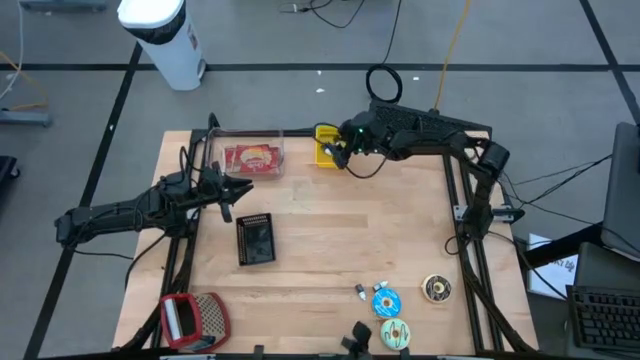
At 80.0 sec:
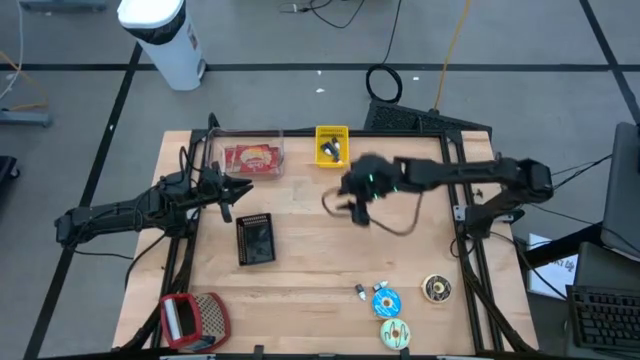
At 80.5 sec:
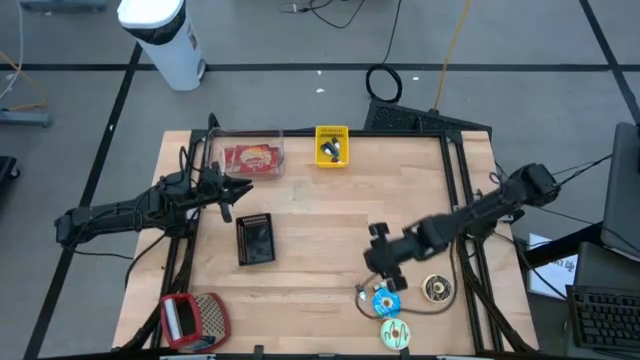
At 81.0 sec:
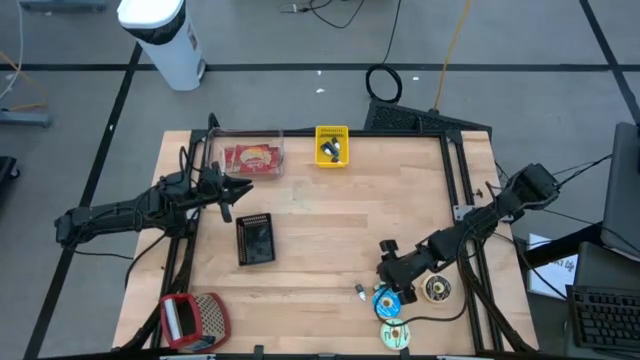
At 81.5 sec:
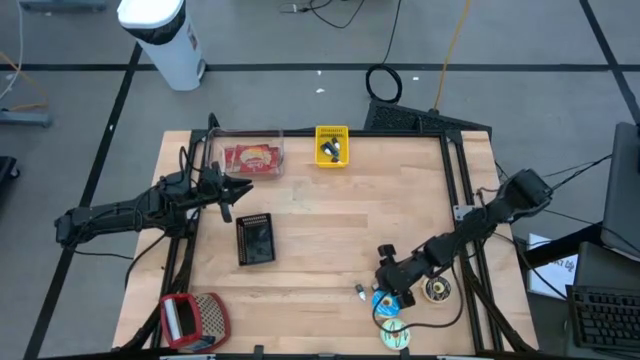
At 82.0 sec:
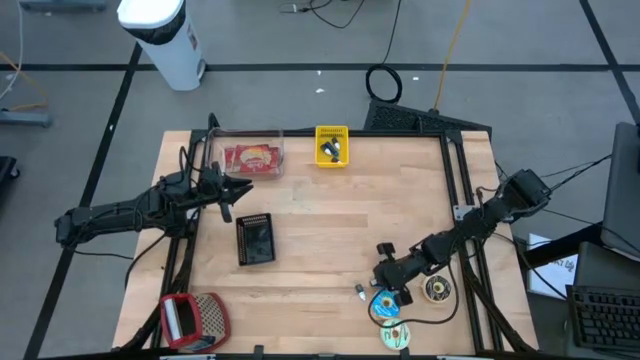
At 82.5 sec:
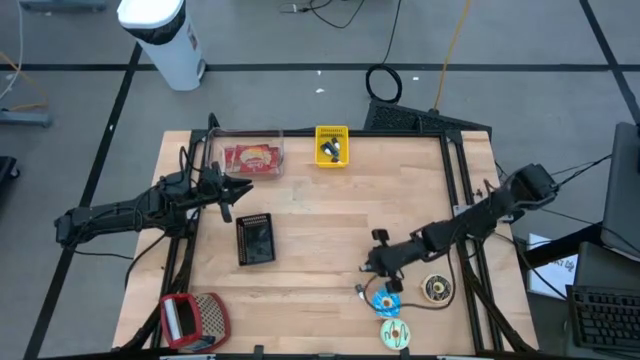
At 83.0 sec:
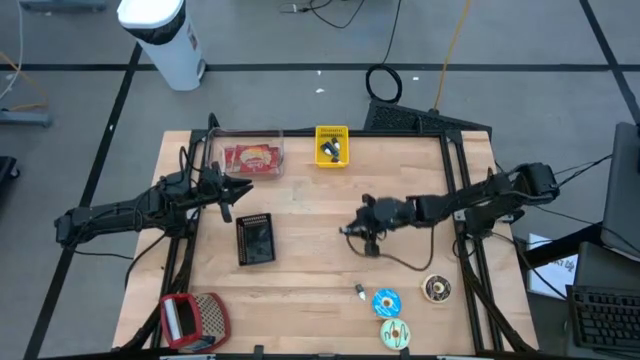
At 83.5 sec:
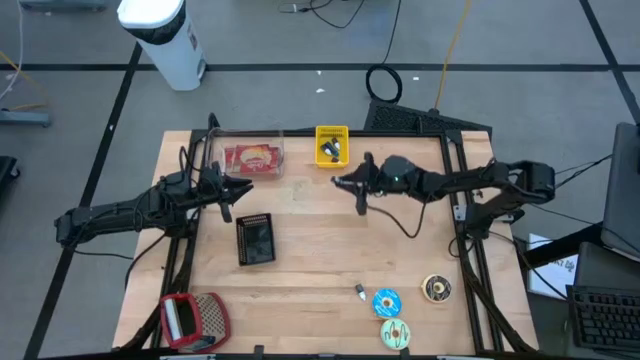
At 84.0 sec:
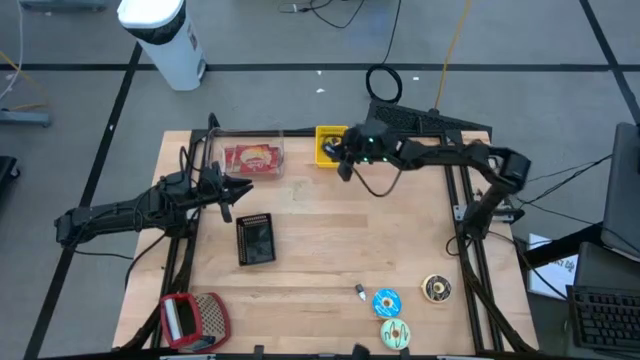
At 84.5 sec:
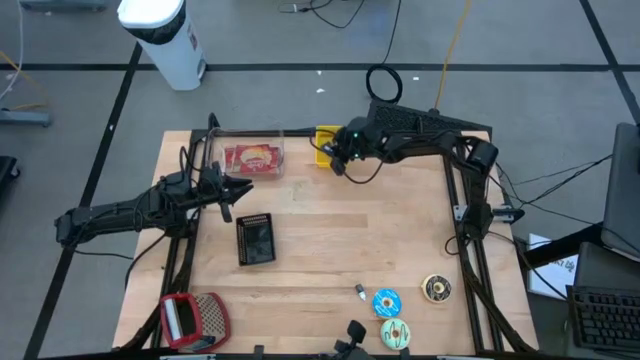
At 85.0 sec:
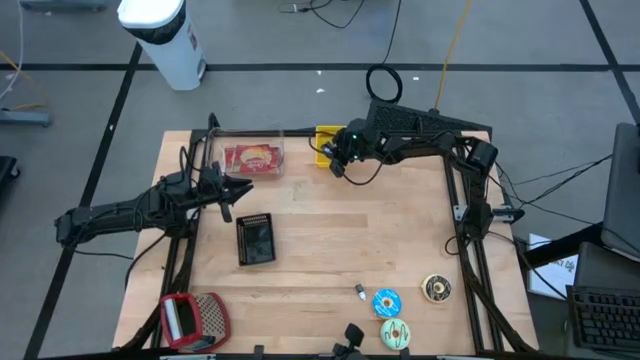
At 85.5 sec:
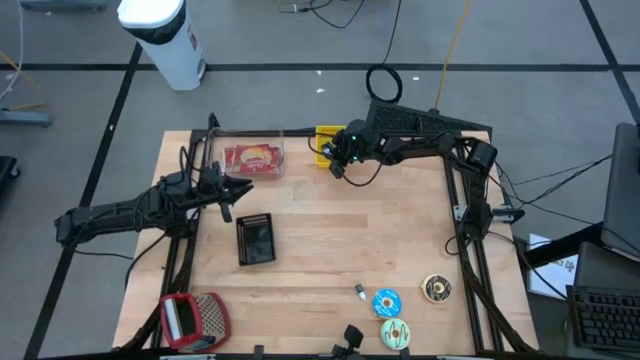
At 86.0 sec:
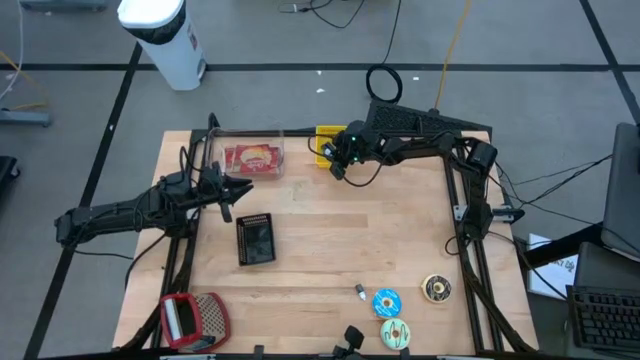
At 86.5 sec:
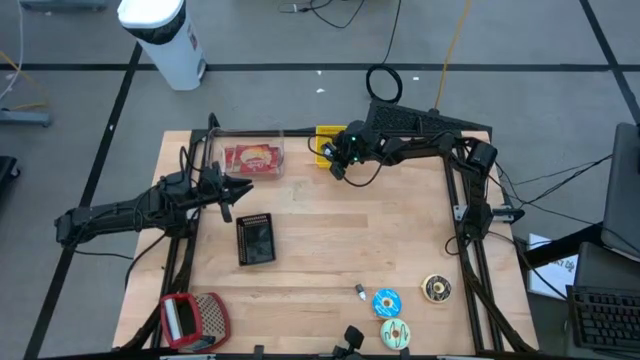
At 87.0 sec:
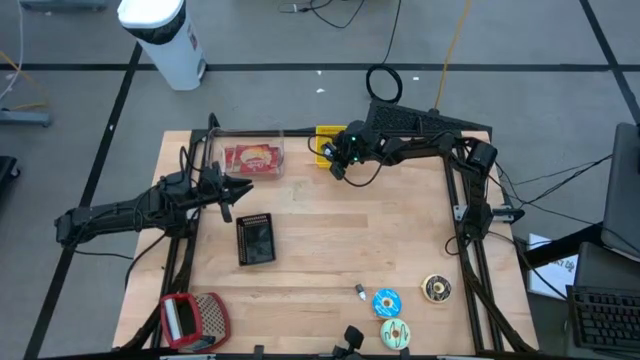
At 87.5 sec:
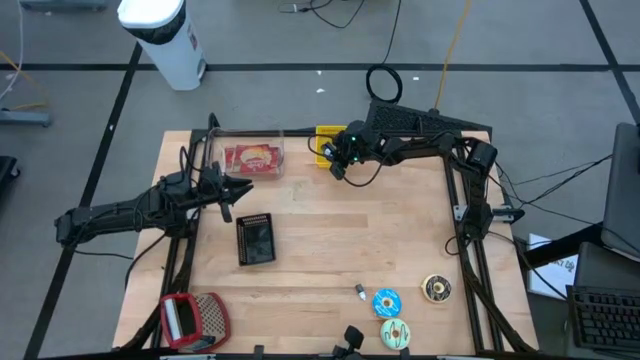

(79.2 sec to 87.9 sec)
Task: Pick & Place Food Item
Put the brown food coloring bottle into the yellow bin

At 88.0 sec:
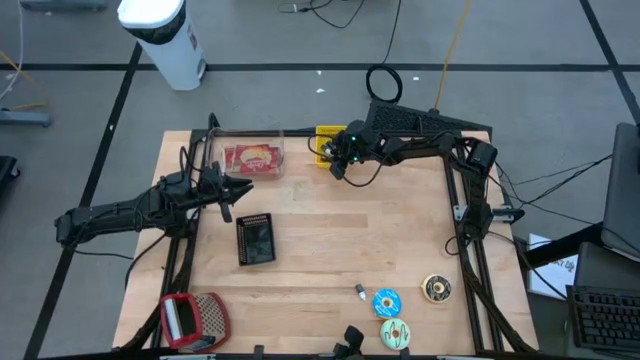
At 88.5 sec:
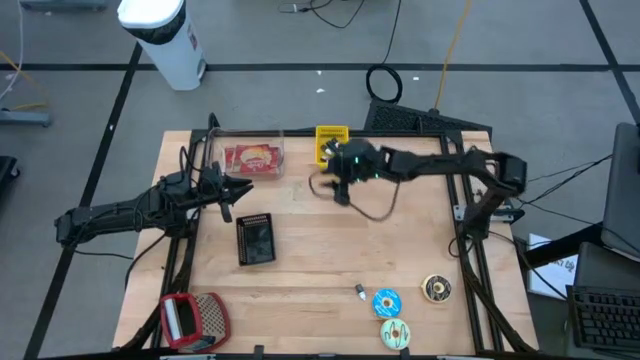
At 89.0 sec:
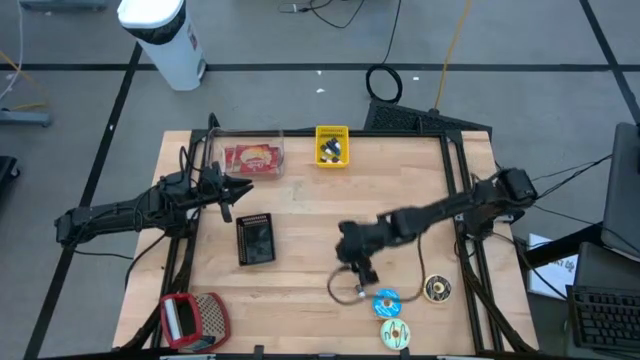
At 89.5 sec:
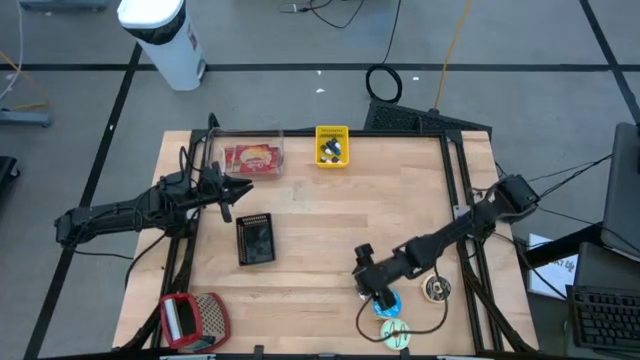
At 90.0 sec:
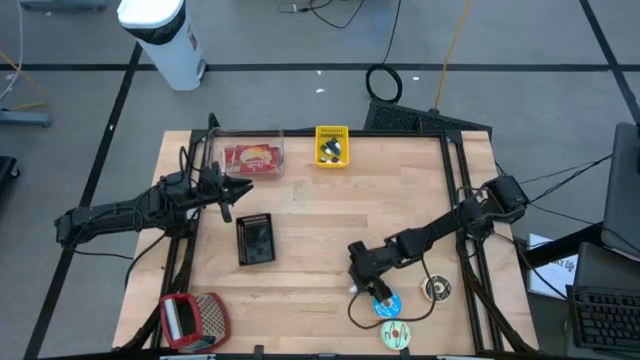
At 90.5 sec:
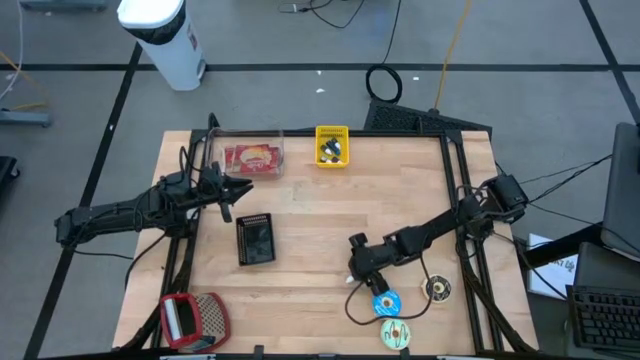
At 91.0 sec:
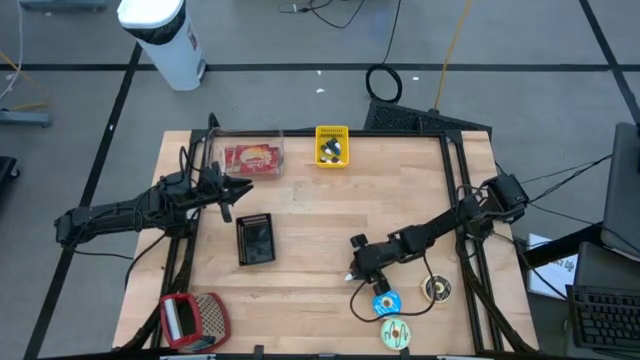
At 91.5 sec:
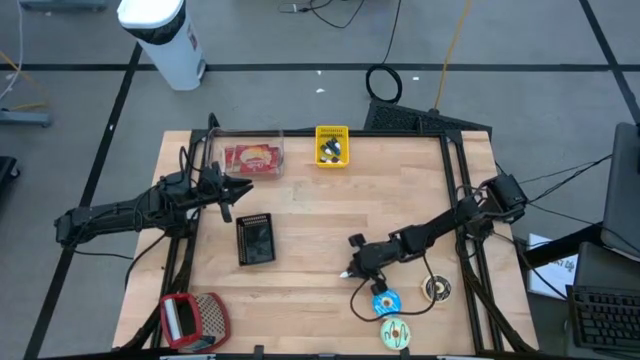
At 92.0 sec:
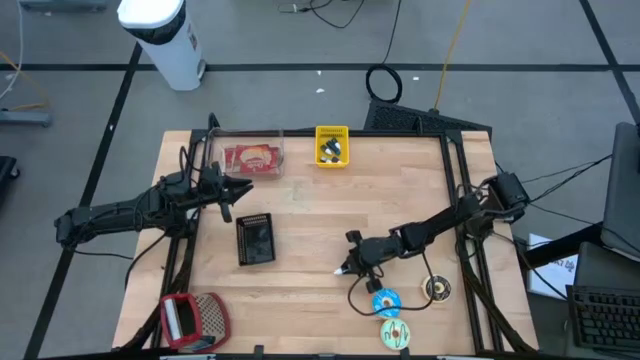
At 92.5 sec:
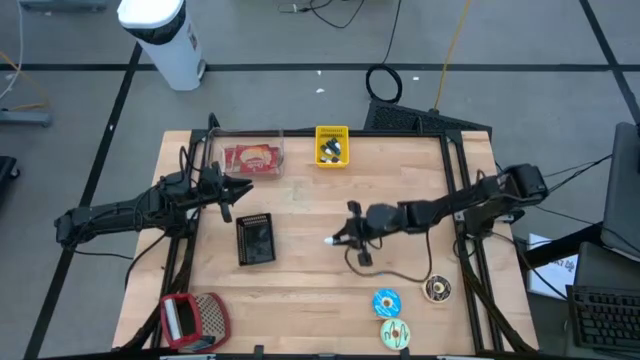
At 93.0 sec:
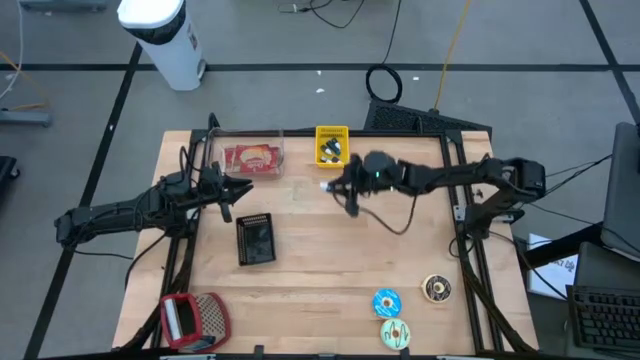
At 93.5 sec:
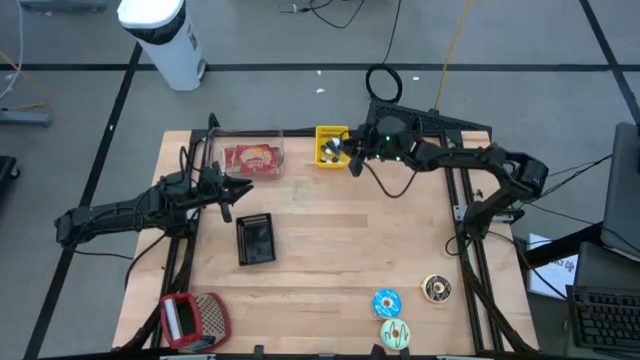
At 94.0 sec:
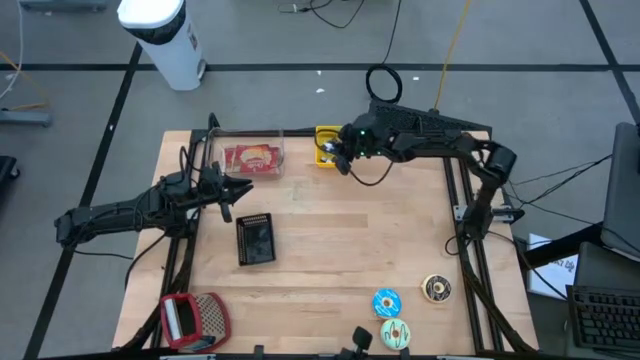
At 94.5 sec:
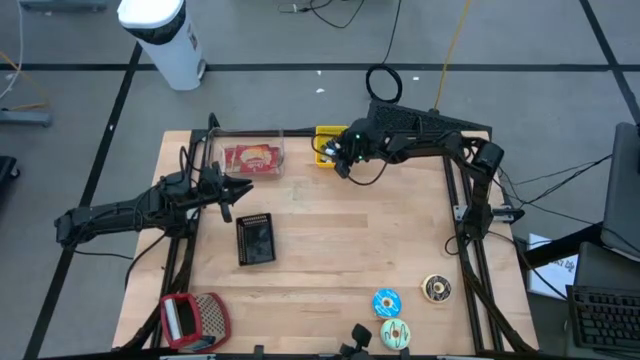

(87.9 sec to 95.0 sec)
Put the green food coloring bottle into the yellow bin

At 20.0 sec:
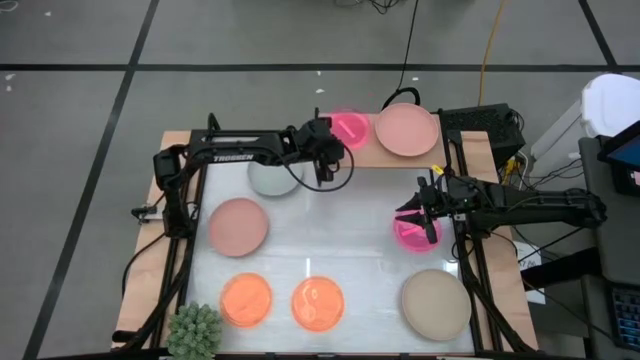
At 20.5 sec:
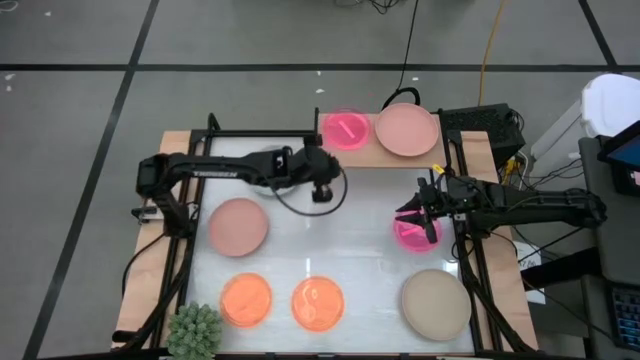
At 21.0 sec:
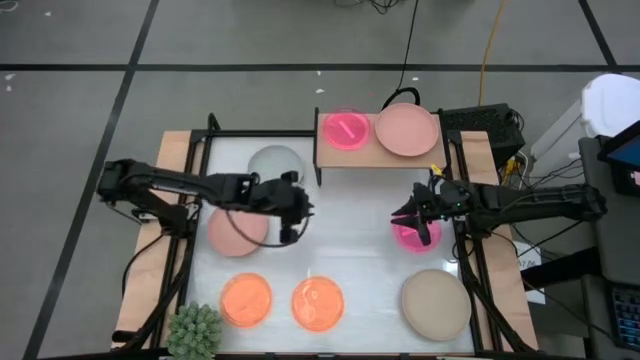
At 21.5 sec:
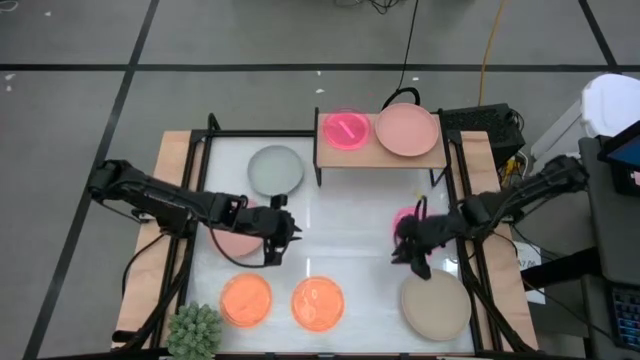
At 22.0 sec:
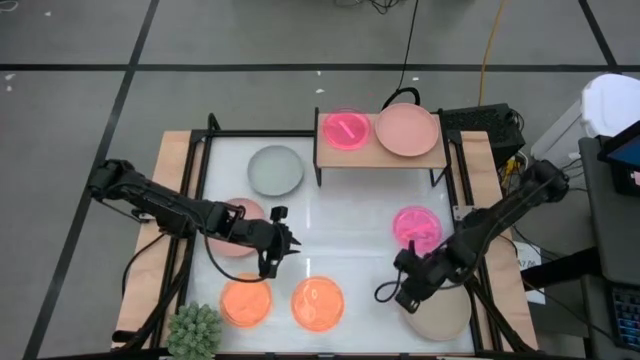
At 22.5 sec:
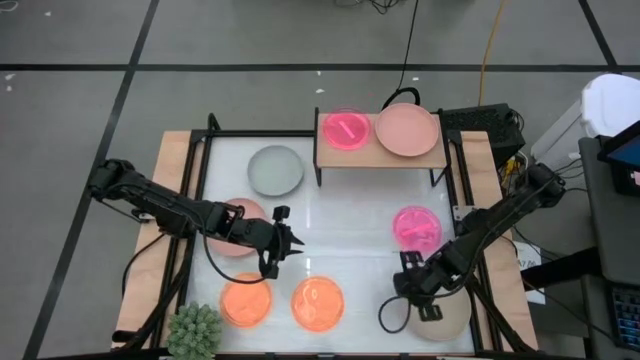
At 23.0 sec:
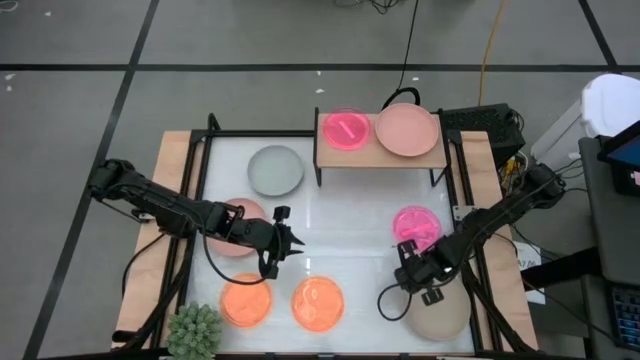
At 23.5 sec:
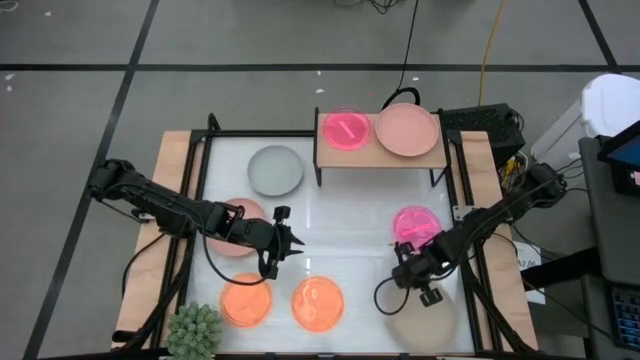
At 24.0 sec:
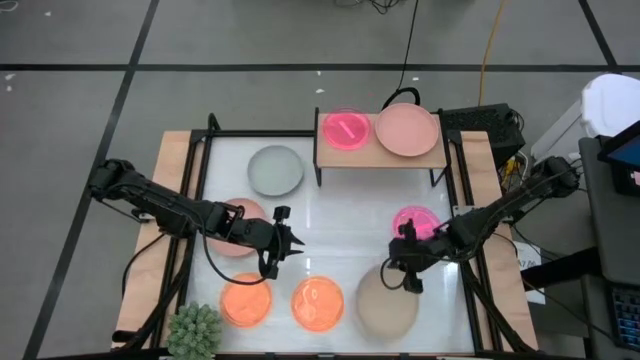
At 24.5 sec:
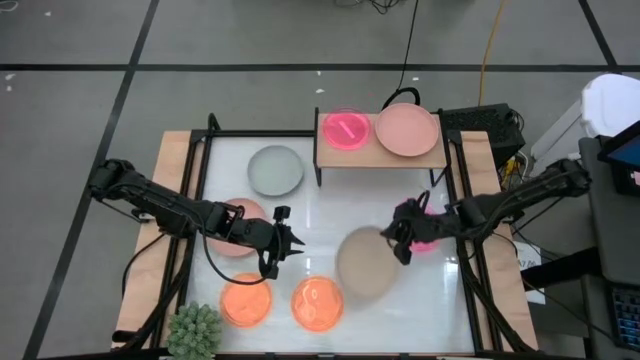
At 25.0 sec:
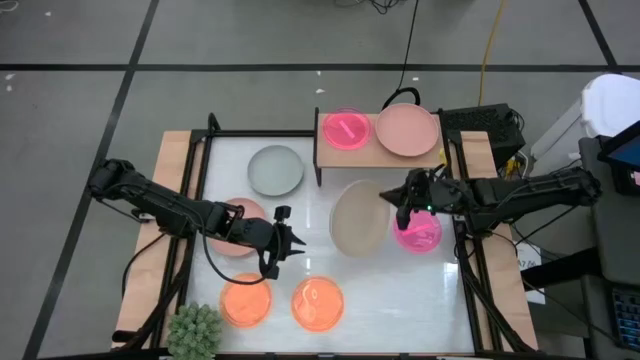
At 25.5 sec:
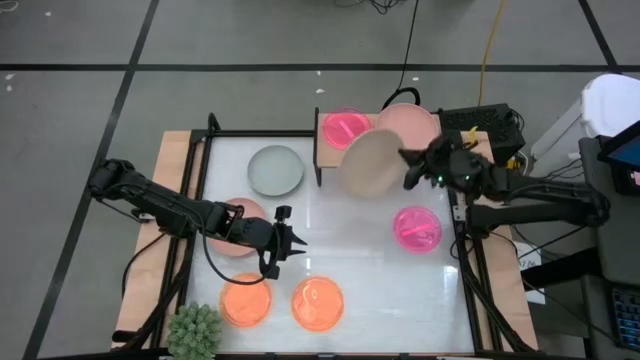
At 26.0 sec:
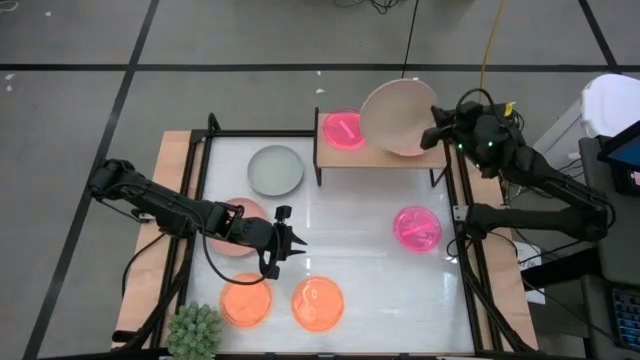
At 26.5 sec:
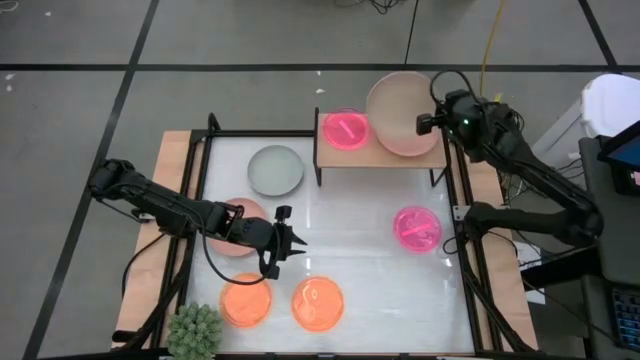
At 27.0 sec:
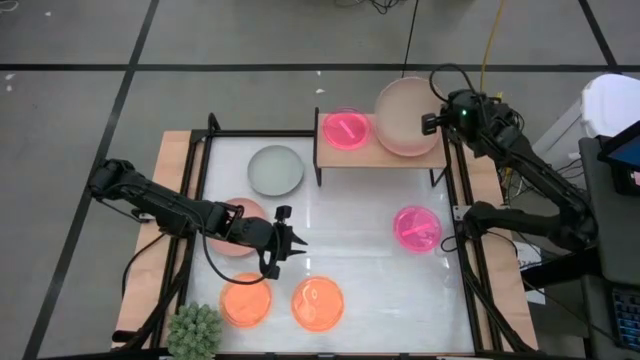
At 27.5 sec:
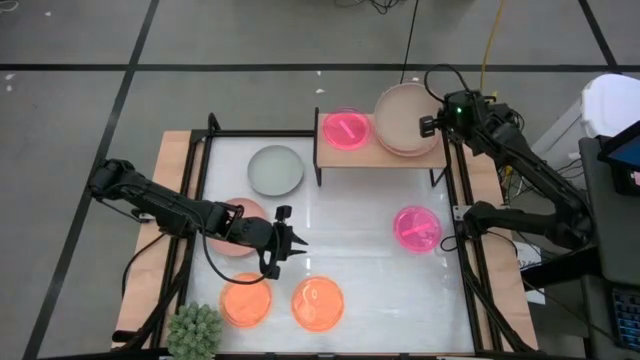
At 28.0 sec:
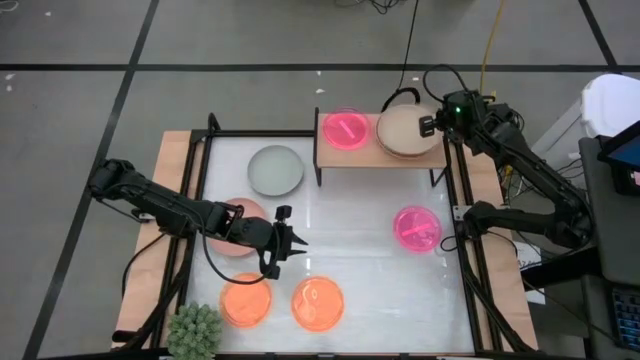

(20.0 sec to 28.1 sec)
Task: Place and stack plates onto a shelf
Stack the light brown plate on top of the pink plate on the shelf
